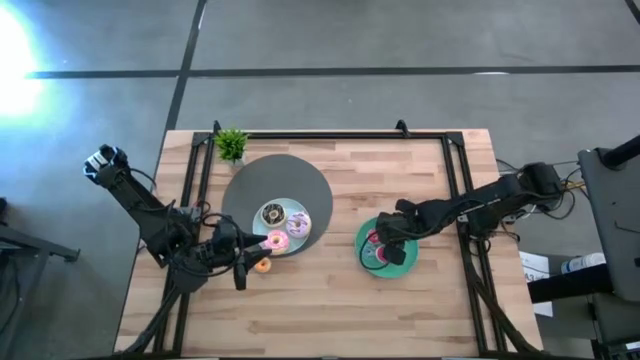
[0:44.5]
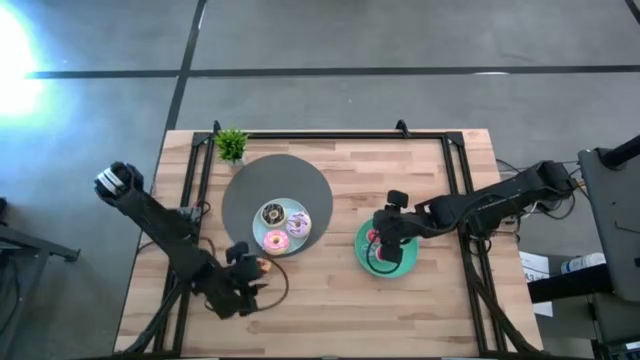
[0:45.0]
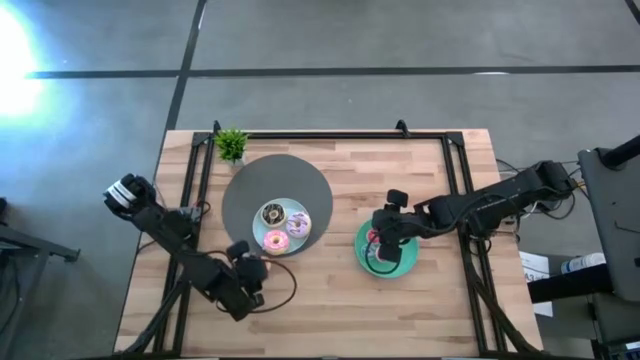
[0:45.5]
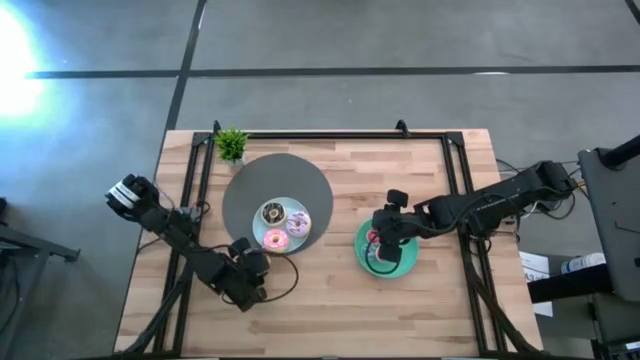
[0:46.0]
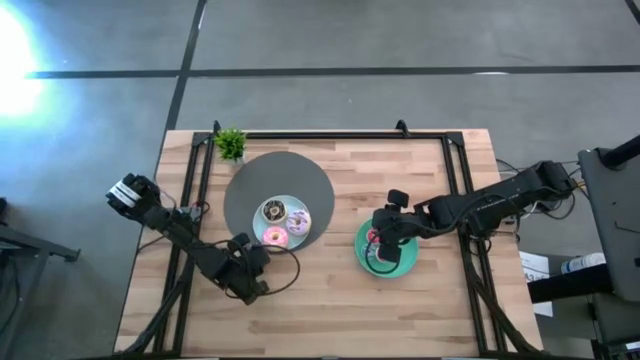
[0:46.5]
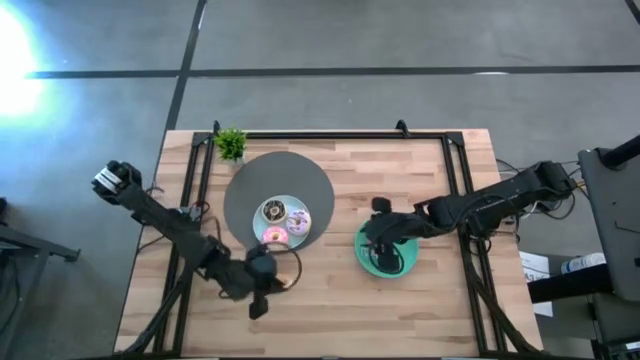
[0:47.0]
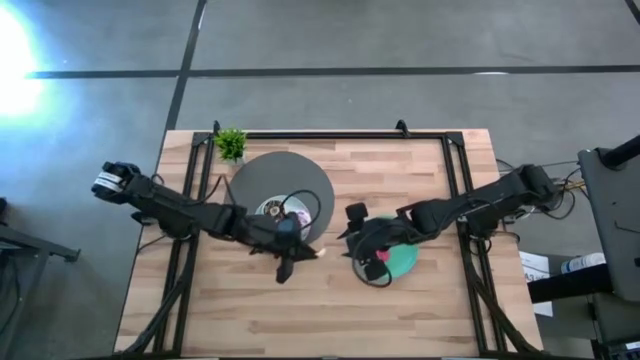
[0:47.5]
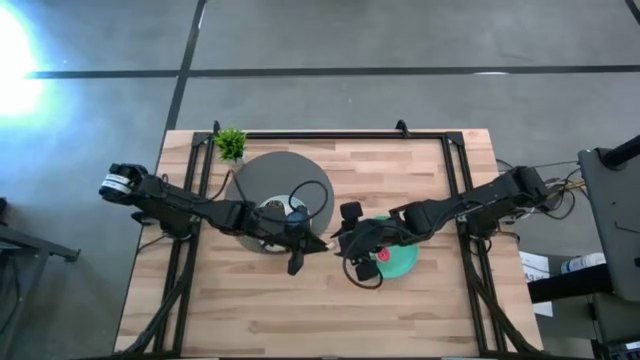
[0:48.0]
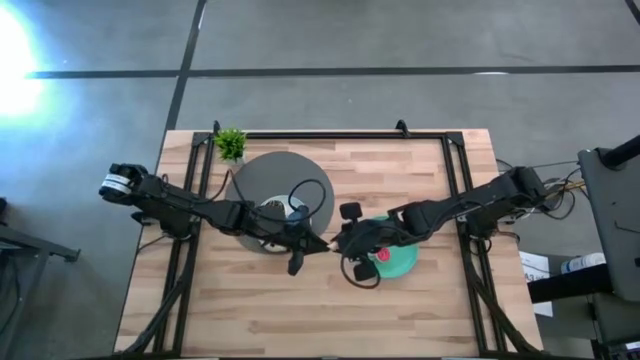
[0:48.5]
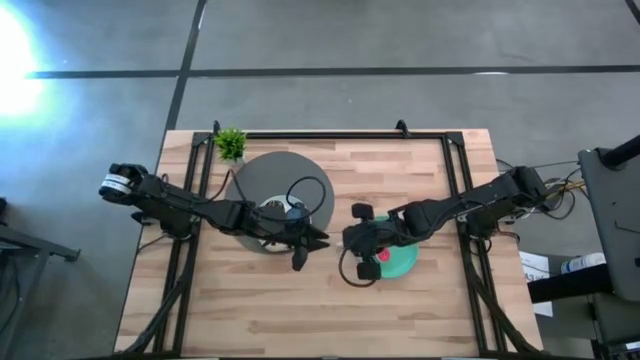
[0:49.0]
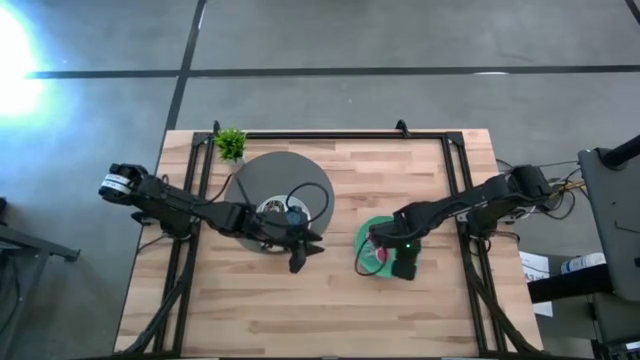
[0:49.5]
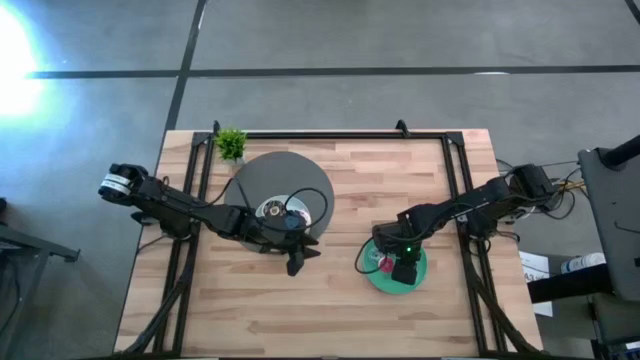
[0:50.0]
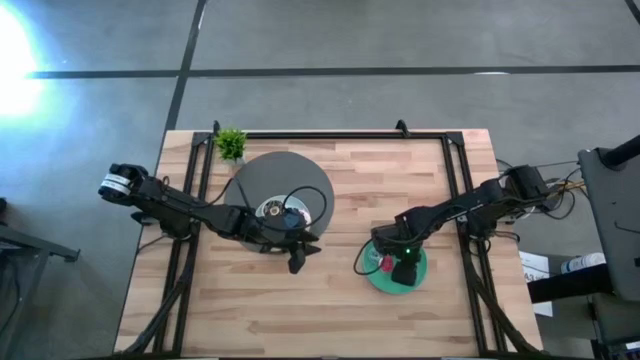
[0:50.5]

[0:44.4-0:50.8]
Task: Pick & Place donuts
Put the small yellow donut on the green plate

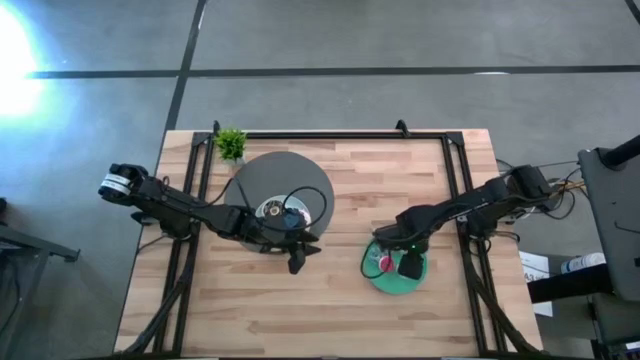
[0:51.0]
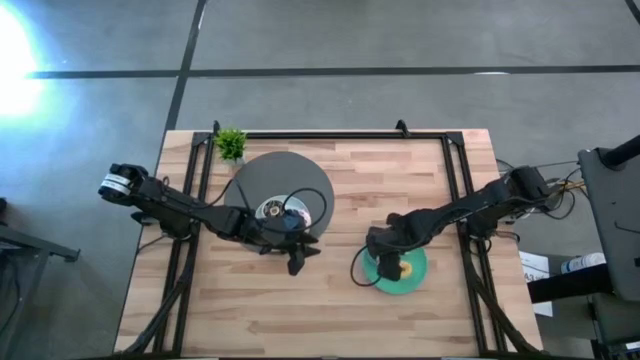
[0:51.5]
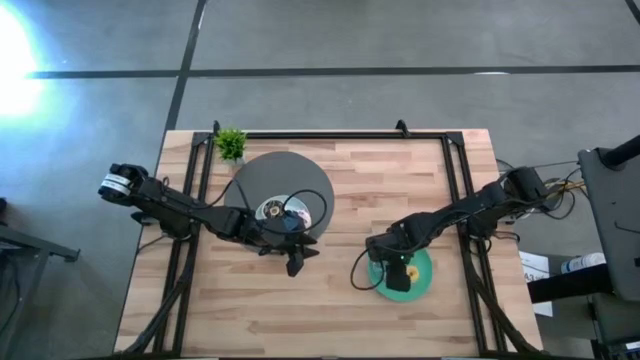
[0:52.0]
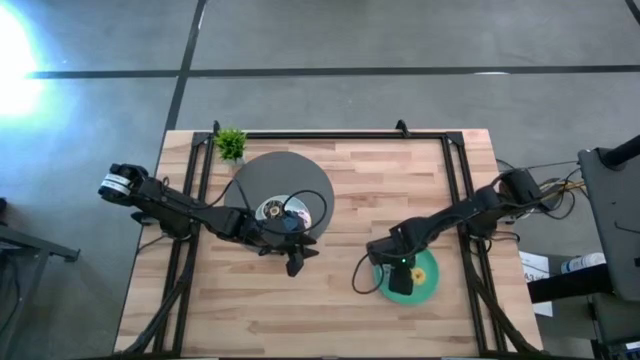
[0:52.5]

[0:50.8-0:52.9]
Adjust the small red donut on the green plate

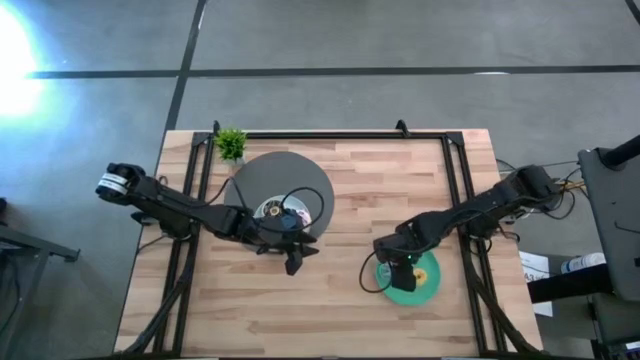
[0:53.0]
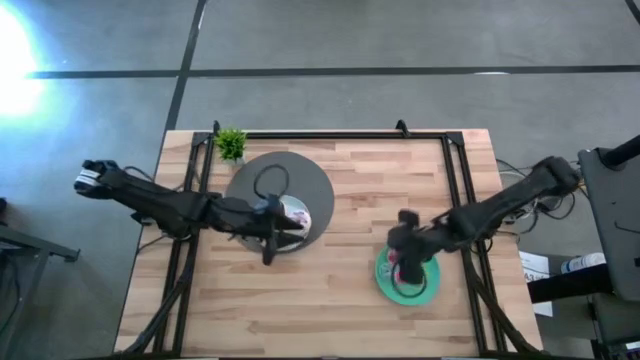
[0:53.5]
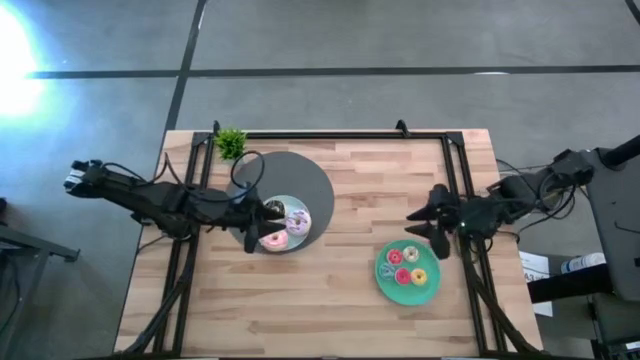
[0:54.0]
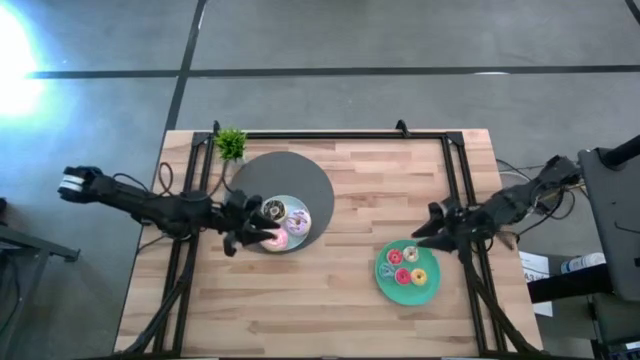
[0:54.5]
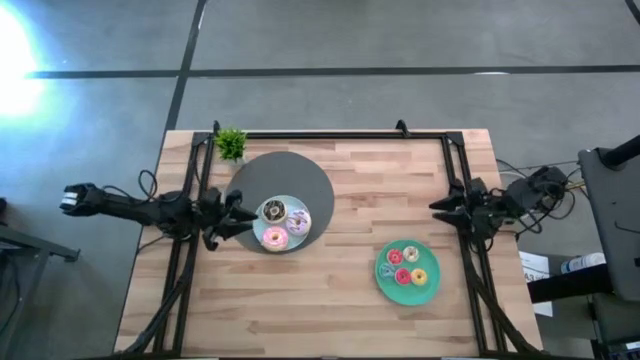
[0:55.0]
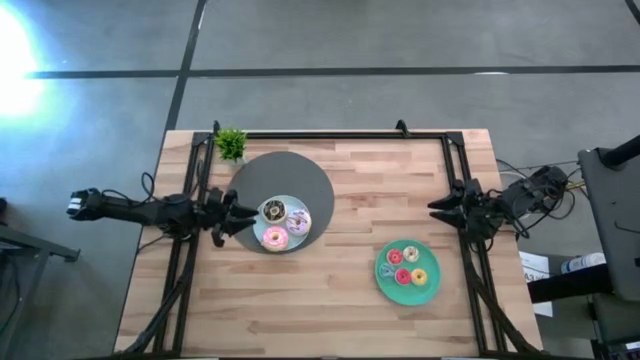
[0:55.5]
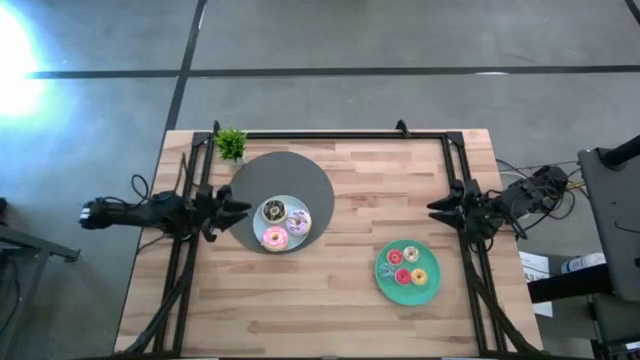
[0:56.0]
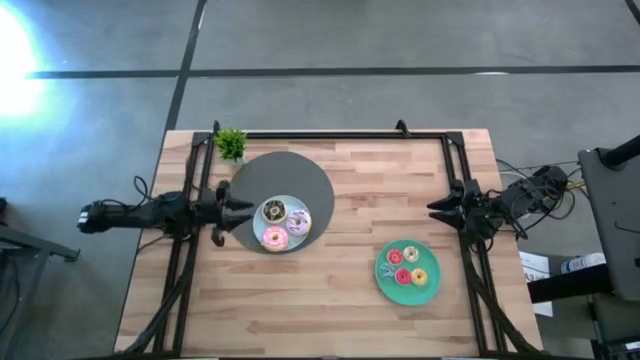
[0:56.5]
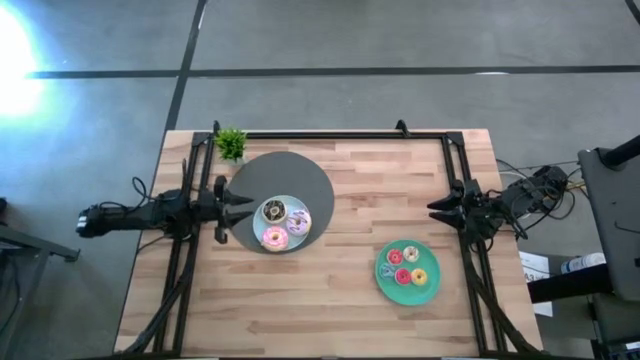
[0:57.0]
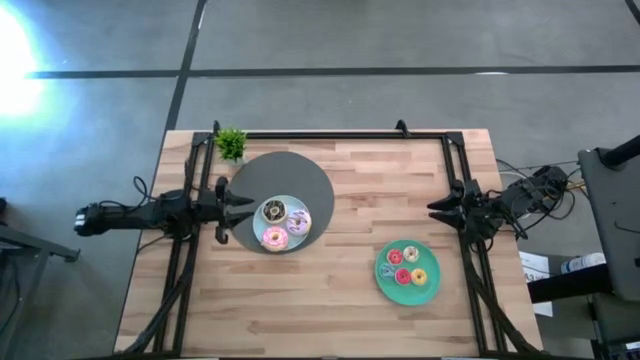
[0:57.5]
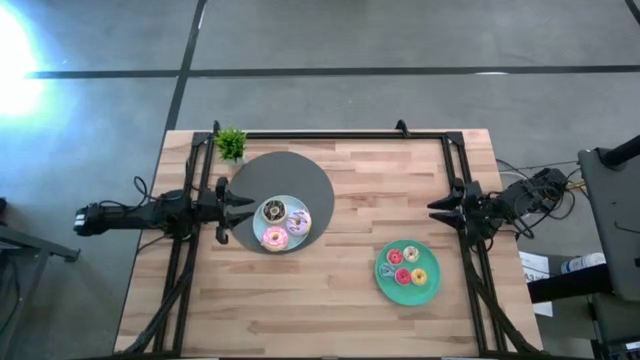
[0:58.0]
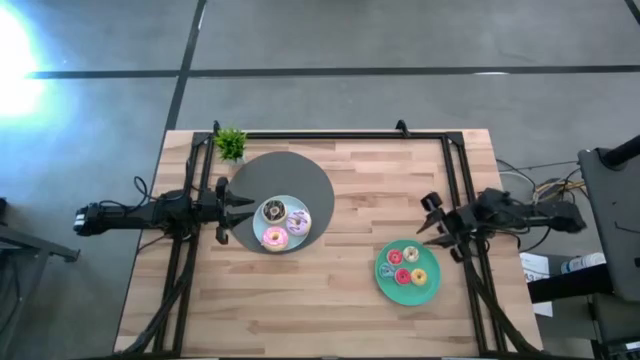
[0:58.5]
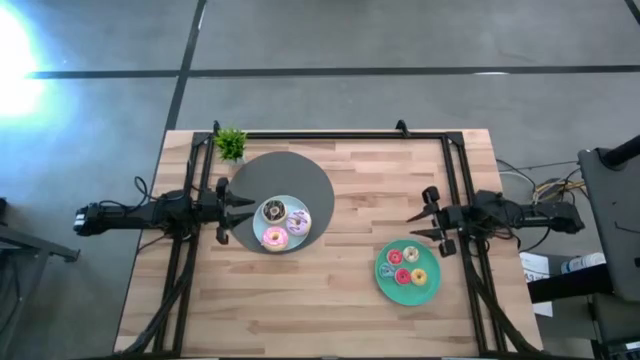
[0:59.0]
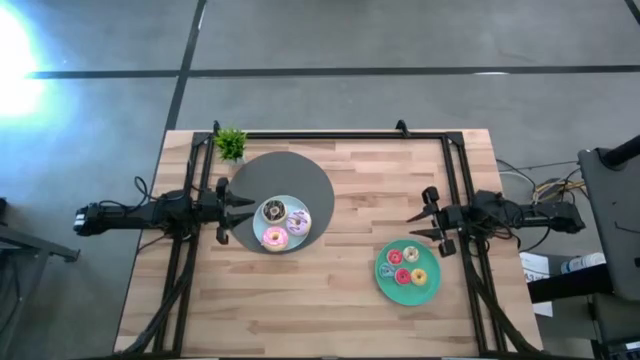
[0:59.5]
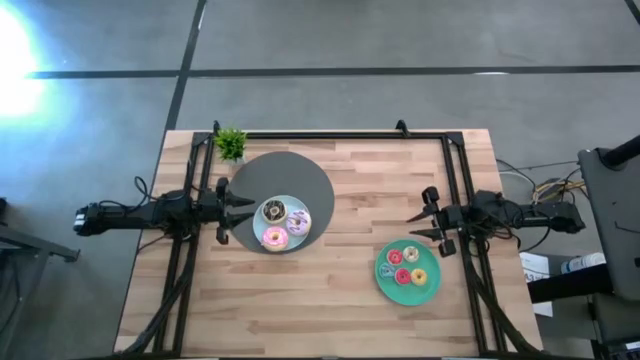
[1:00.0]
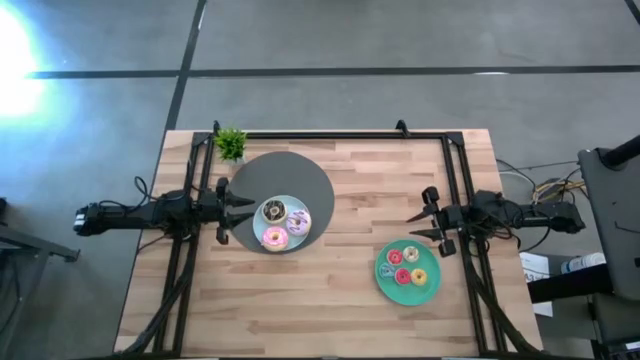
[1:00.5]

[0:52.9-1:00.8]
Return to Home Position

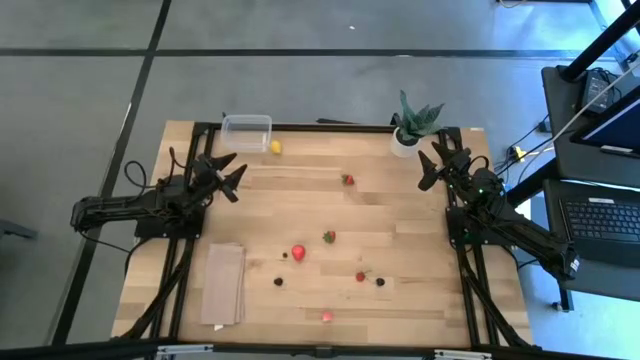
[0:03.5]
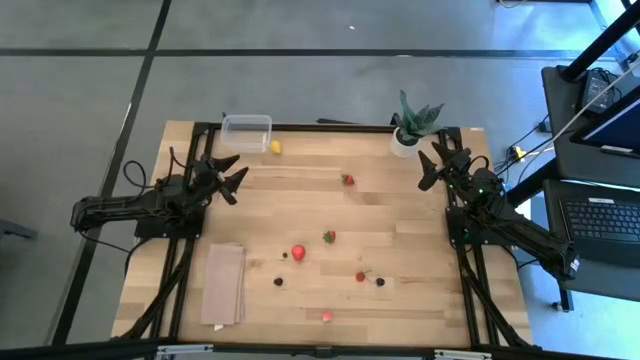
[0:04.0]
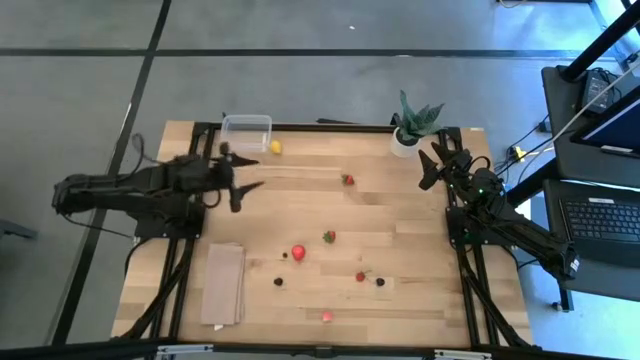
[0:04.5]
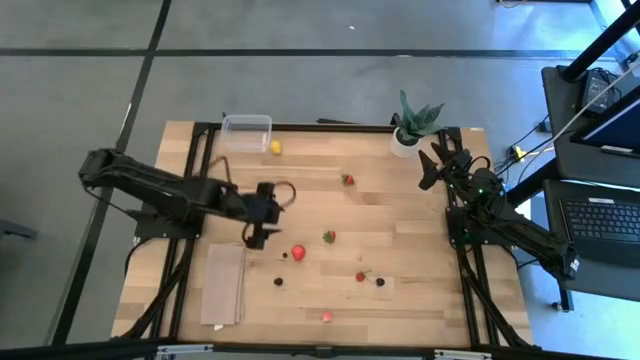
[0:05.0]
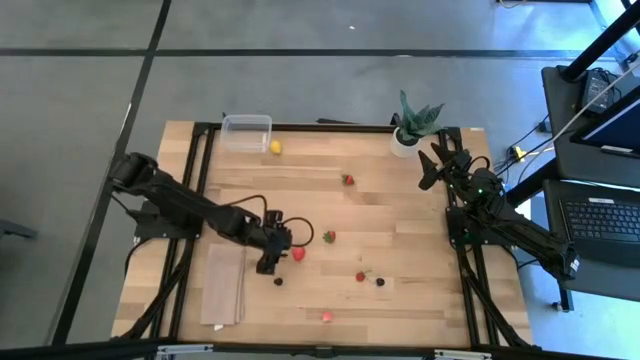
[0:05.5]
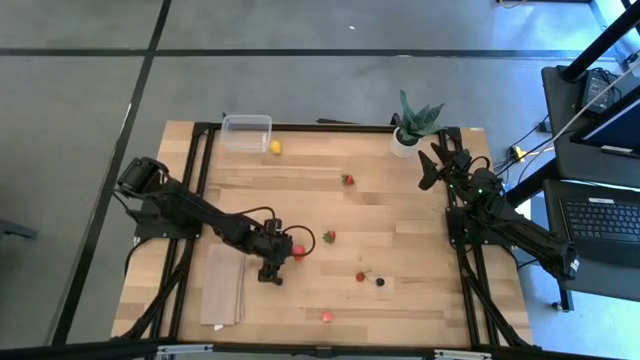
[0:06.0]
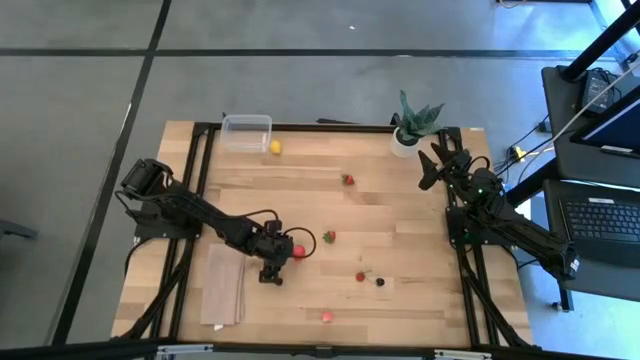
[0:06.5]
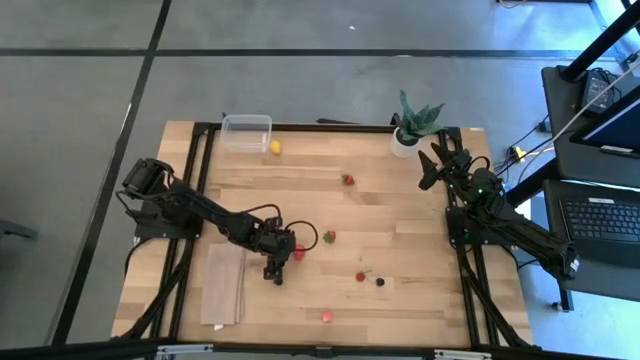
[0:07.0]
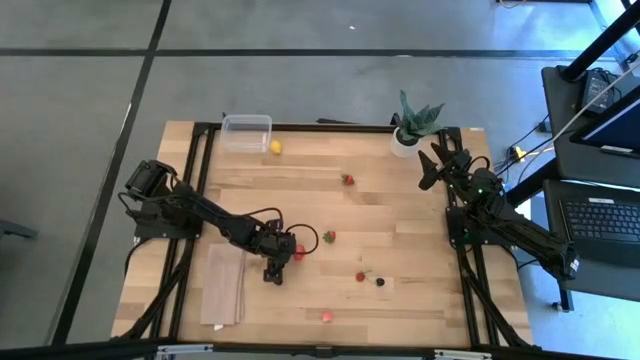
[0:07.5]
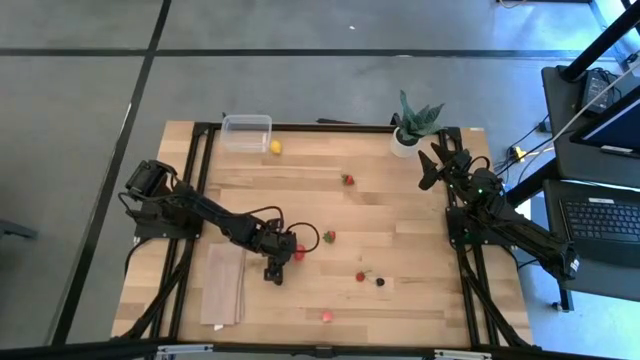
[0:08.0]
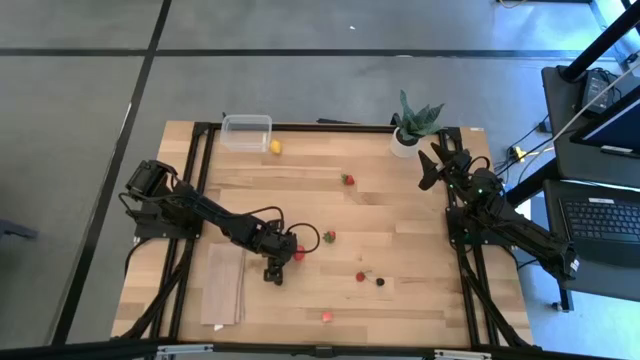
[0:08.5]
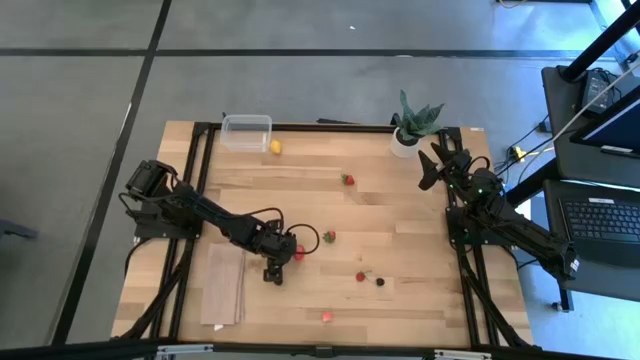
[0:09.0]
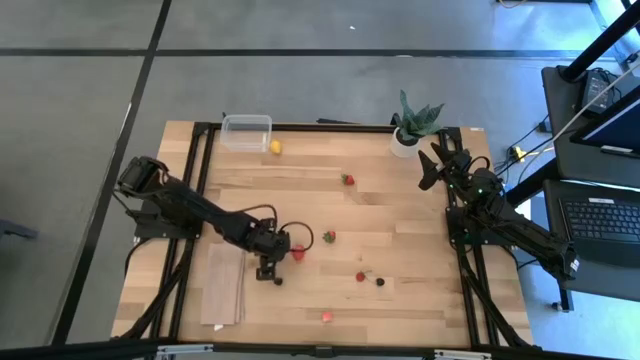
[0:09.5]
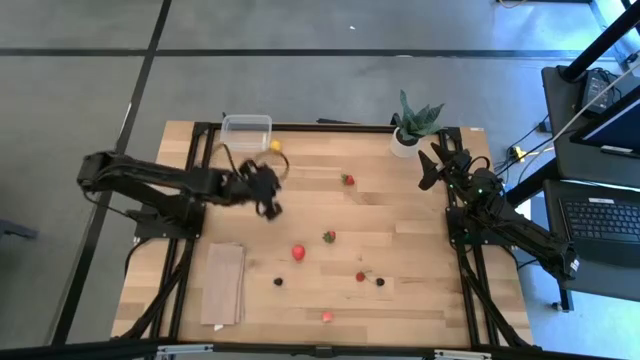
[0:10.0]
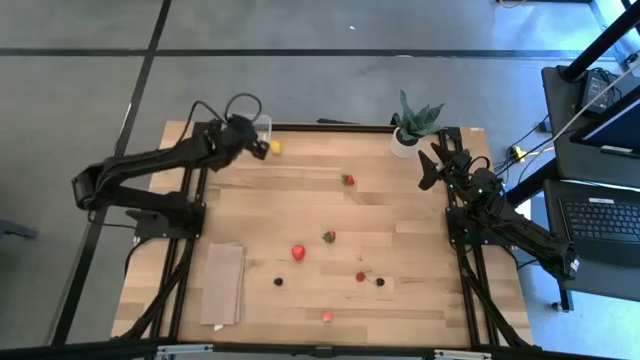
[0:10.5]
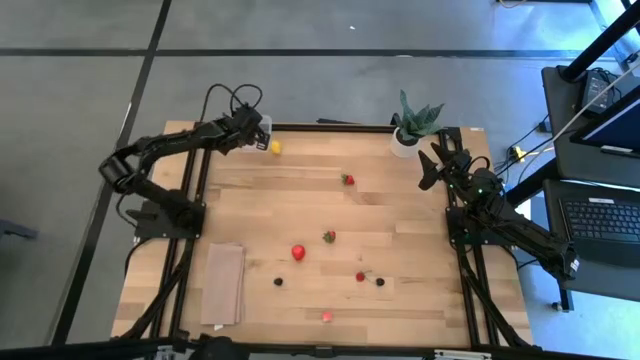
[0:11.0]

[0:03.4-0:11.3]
Task: Pick and placing Produce into tupperware
Put the blueberry into the transparent container
